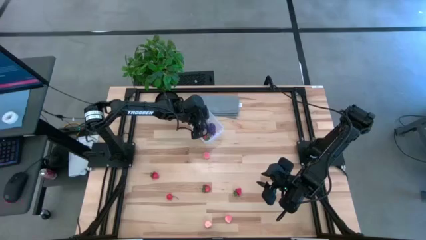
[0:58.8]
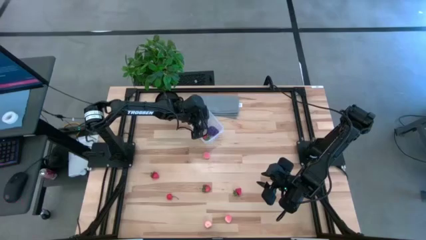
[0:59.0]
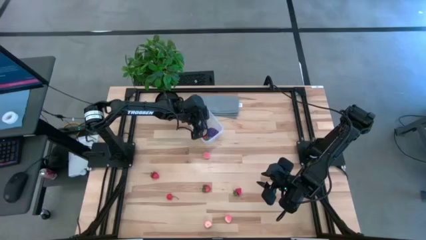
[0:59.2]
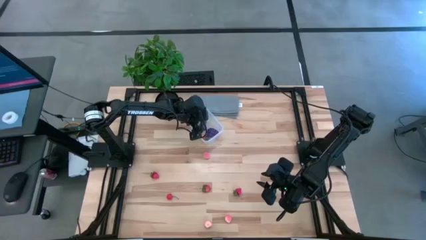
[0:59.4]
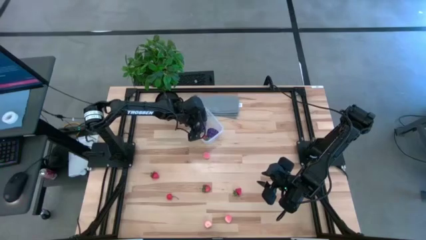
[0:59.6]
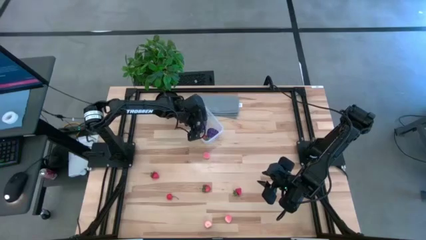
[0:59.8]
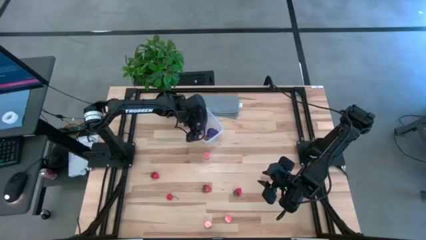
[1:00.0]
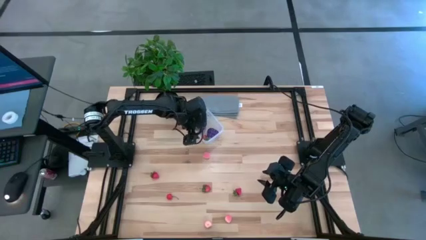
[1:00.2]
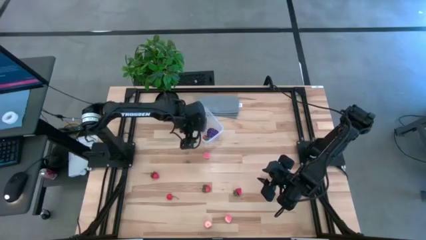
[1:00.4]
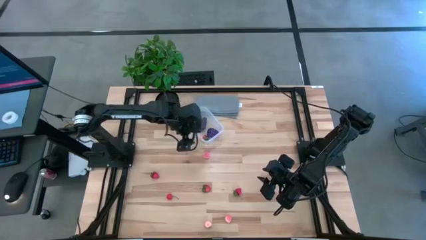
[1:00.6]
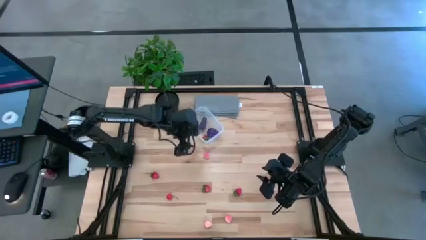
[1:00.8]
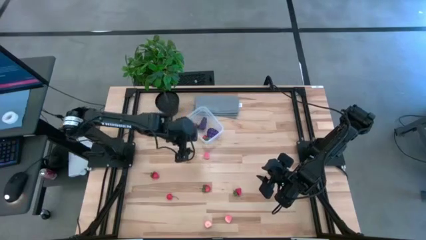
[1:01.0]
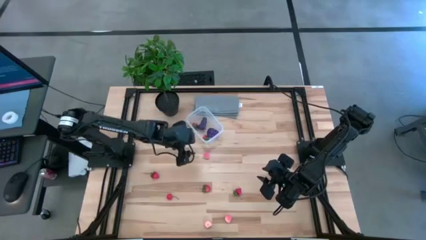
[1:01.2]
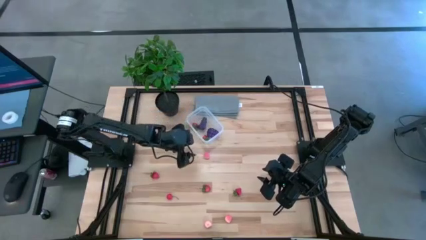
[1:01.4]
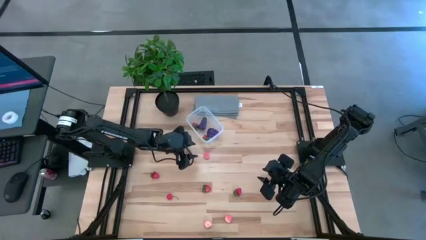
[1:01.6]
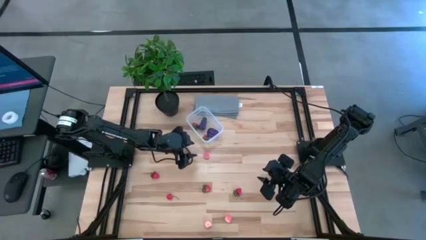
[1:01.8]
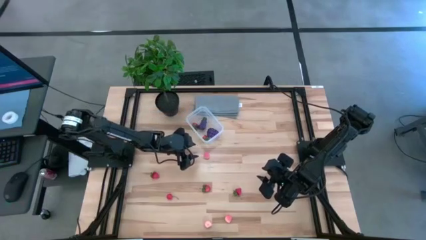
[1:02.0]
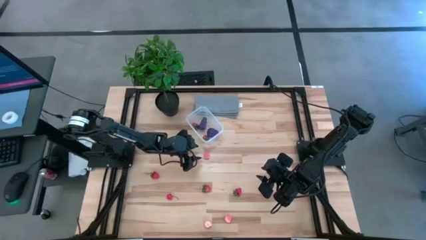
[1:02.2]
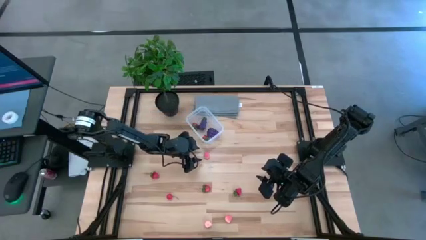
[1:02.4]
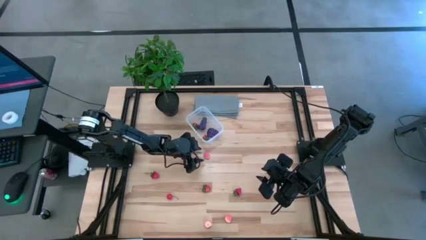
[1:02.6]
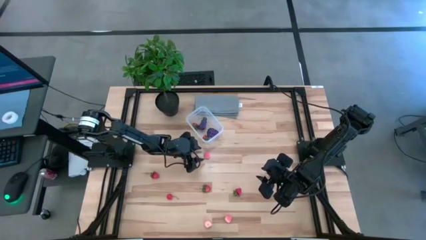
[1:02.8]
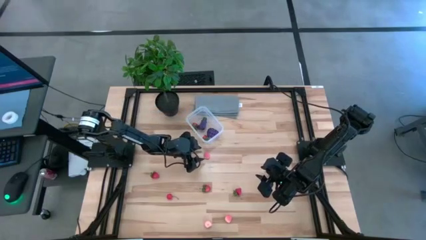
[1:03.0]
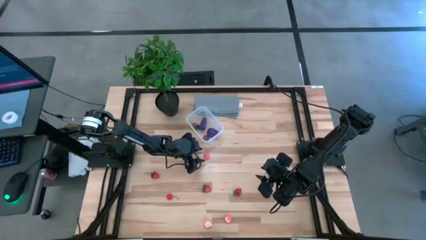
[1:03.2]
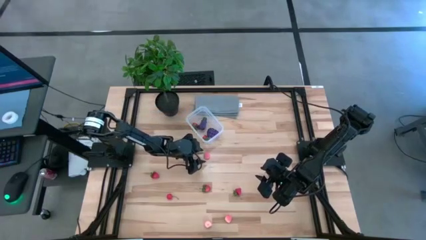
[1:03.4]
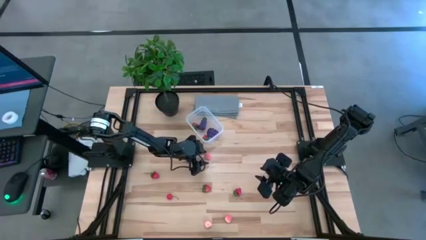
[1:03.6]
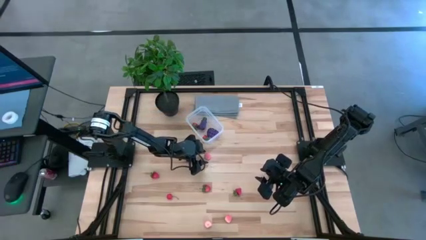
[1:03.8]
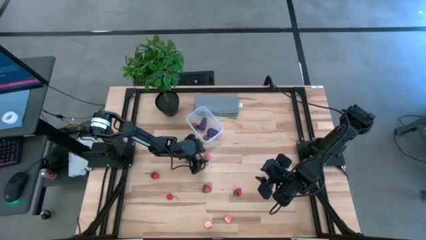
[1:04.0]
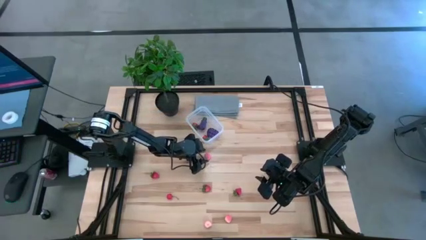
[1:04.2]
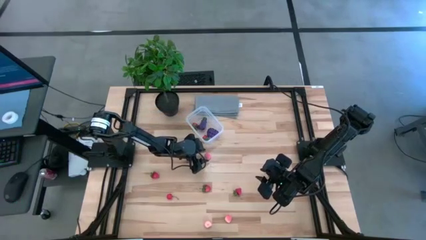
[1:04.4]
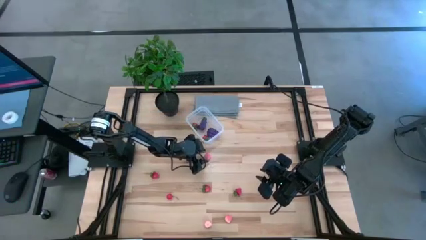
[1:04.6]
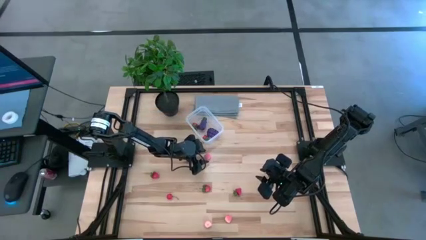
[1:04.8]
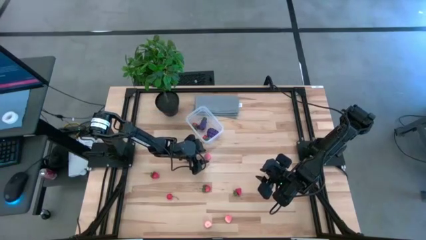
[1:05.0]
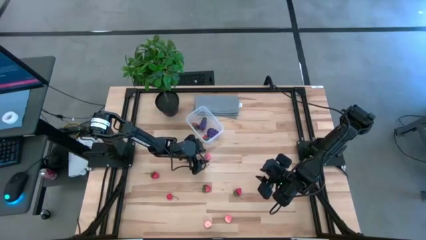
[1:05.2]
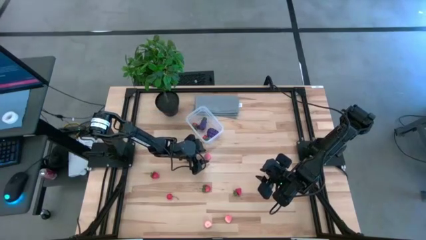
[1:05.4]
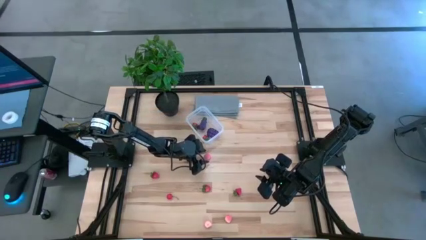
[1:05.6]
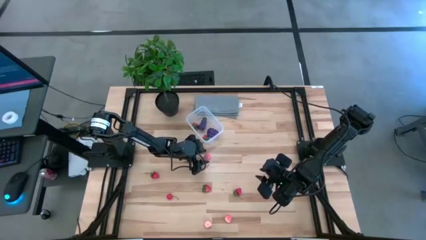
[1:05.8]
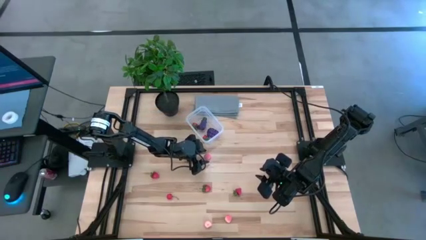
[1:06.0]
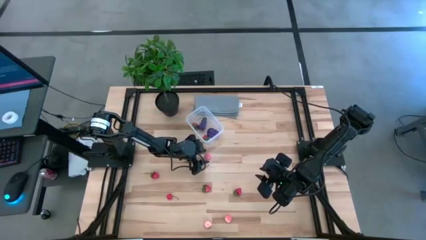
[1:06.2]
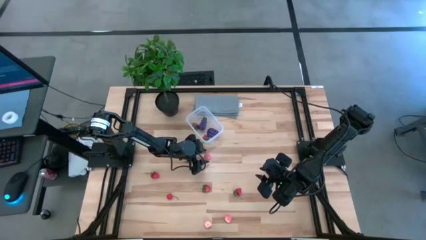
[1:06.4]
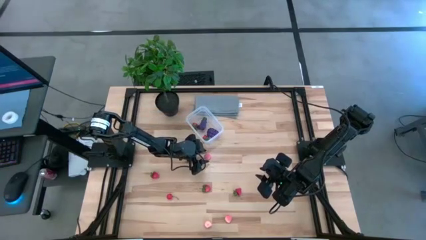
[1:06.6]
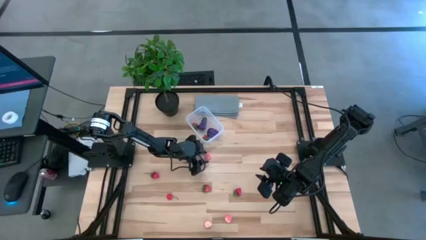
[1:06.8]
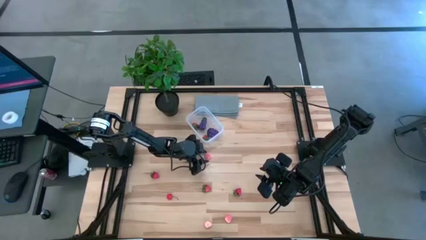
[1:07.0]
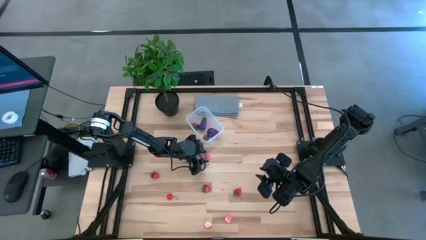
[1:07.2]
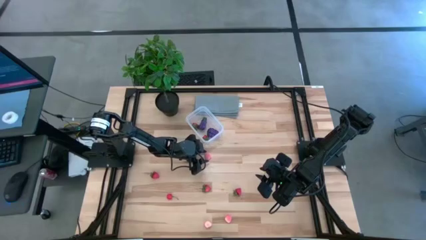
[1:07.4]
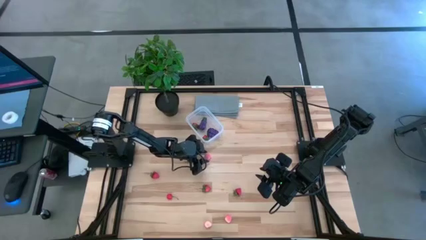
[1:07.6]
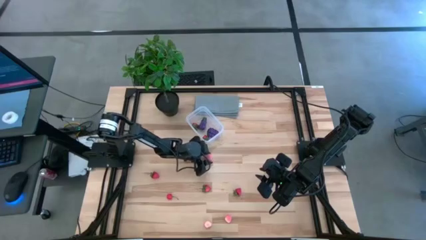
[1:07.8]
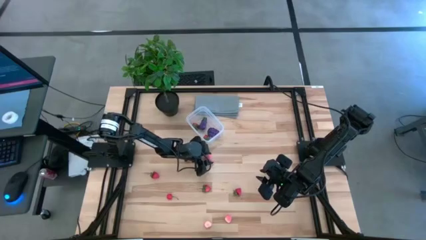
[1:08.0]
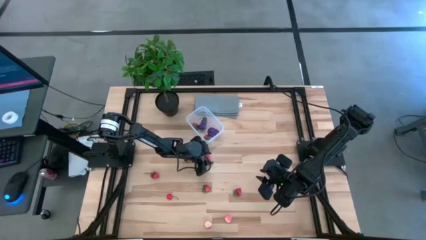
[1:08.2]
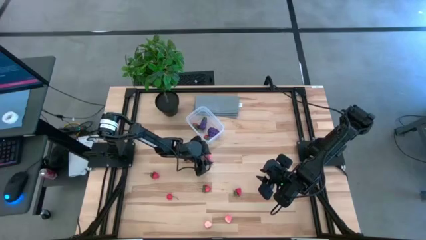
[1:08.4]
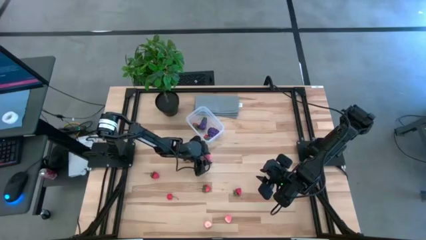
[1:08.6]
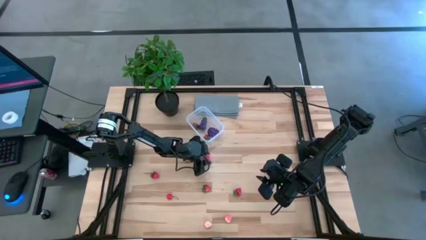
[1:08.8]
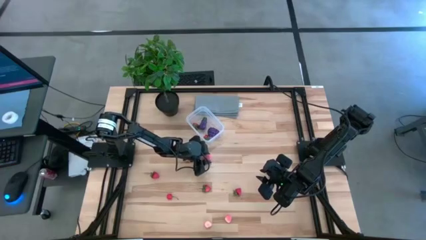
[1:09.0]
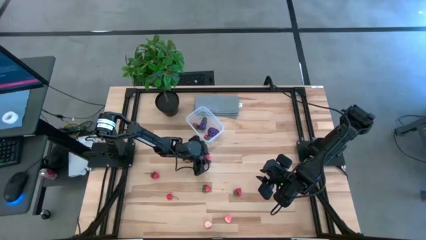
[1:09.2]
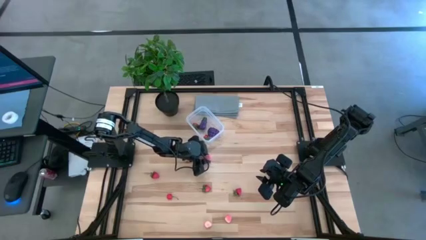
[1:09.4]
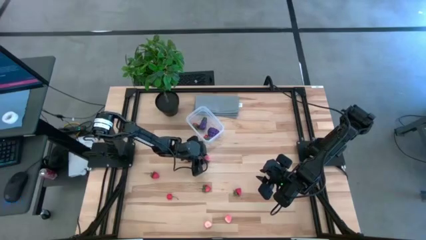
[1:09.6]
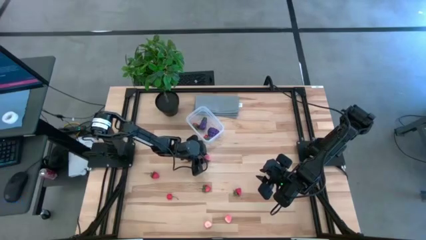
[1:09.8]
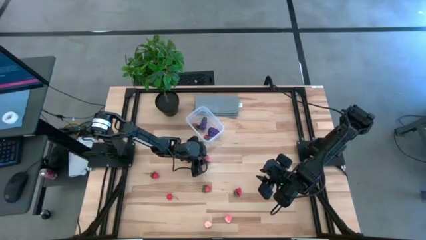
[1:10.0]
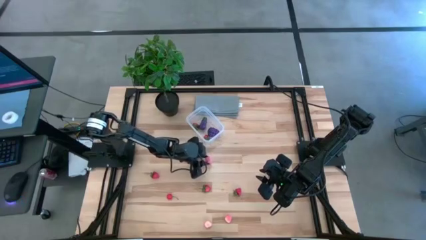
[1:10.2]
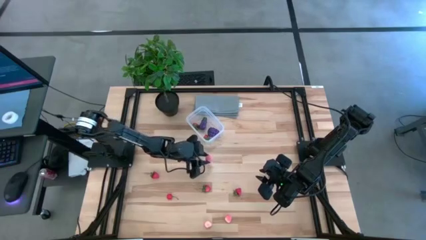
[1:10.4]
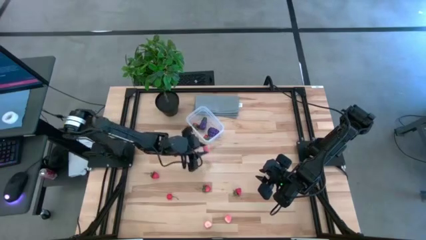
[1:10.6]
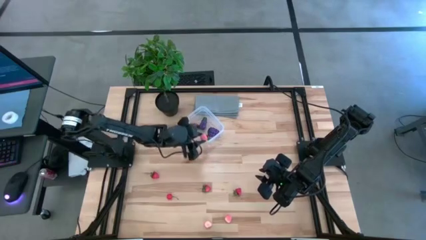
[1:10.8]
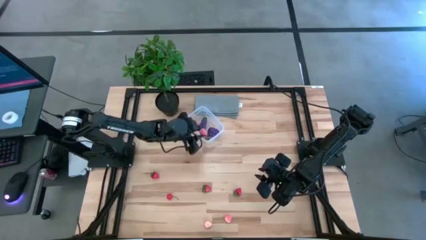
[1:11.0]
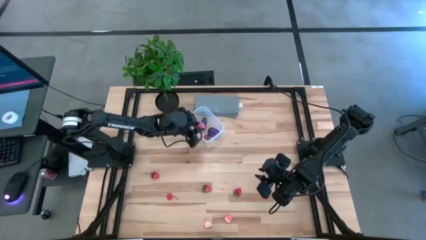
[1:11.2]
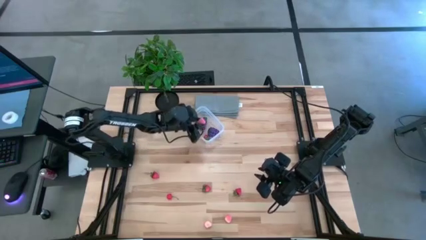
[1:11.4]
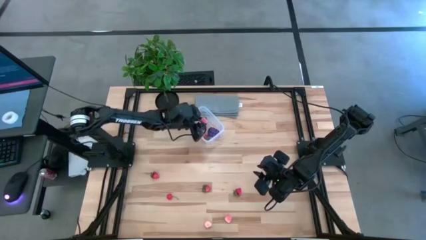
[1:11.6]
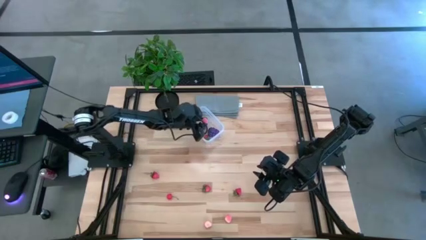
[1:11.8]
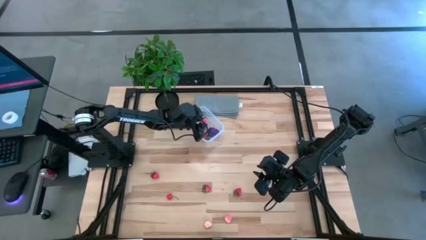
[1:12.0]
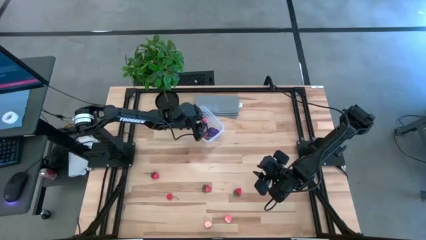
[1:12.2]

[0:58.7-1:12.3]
Task: Pick and placing Produce into tupperware
Put the pink peach into the transparent bin
